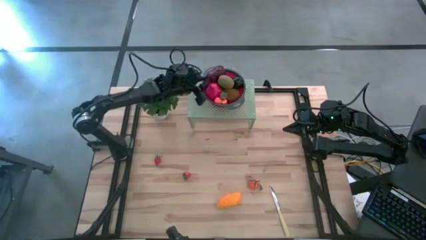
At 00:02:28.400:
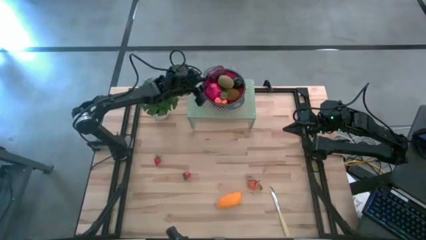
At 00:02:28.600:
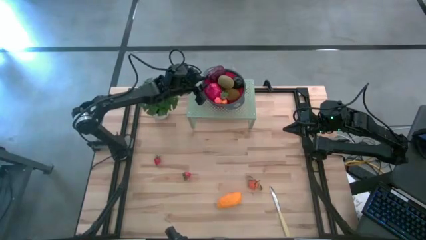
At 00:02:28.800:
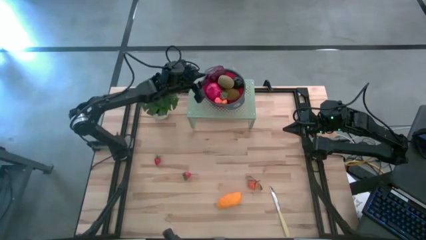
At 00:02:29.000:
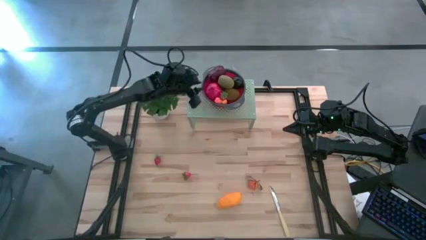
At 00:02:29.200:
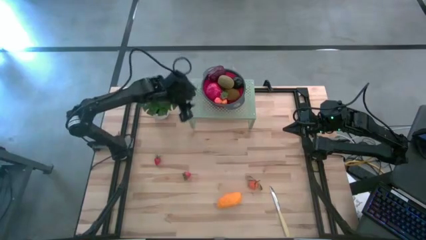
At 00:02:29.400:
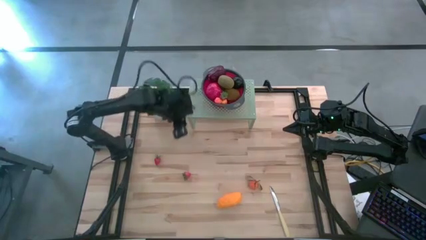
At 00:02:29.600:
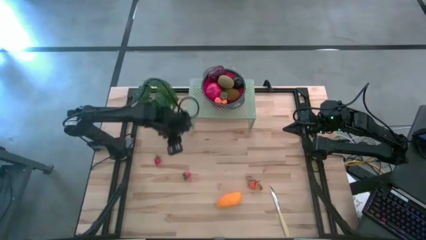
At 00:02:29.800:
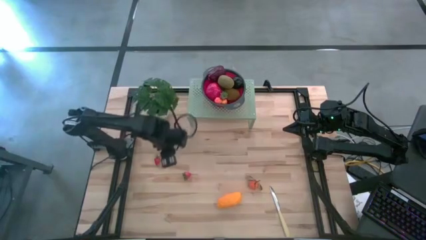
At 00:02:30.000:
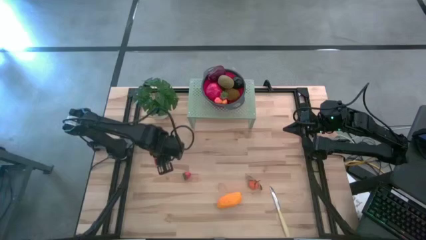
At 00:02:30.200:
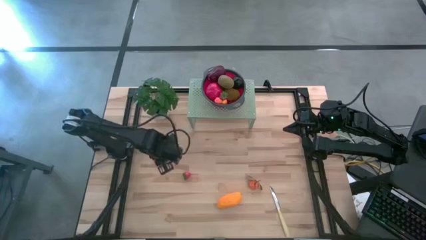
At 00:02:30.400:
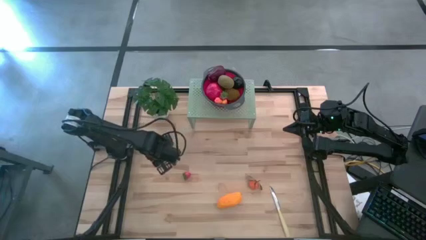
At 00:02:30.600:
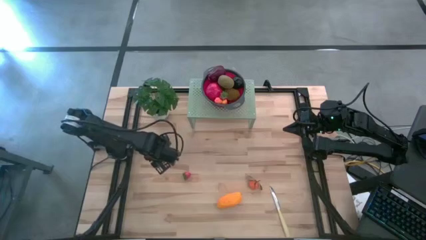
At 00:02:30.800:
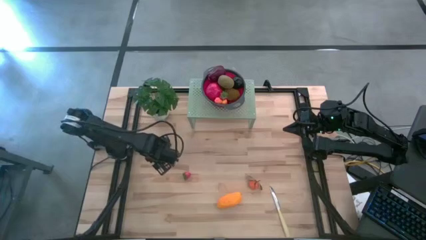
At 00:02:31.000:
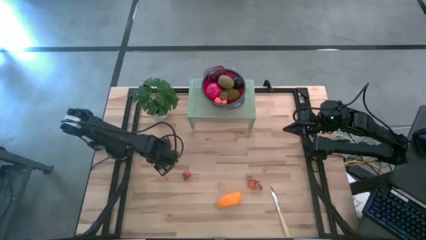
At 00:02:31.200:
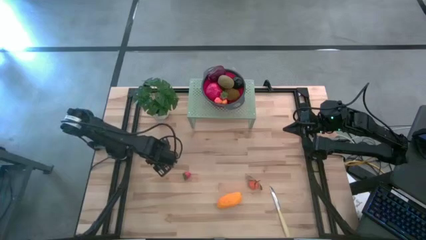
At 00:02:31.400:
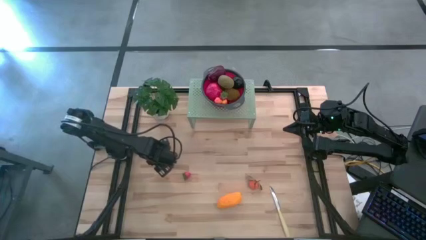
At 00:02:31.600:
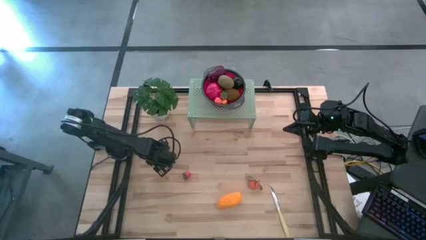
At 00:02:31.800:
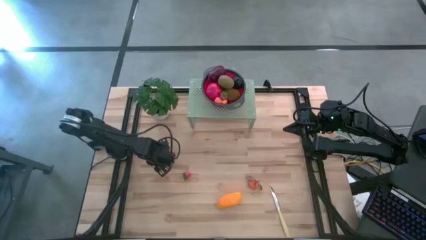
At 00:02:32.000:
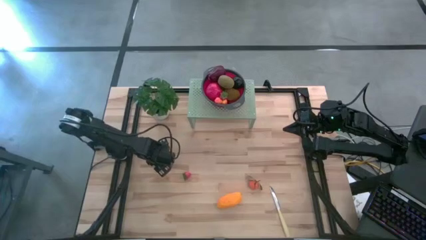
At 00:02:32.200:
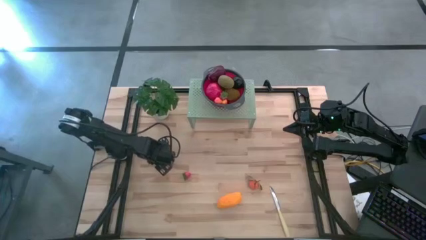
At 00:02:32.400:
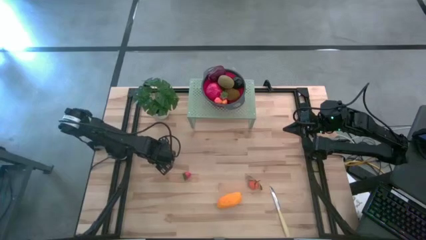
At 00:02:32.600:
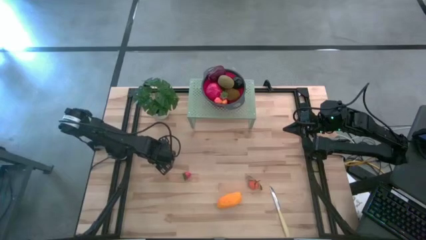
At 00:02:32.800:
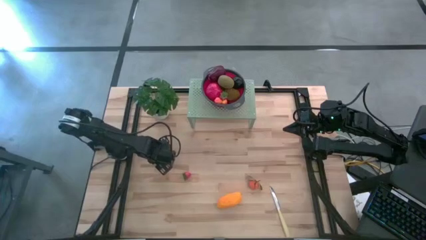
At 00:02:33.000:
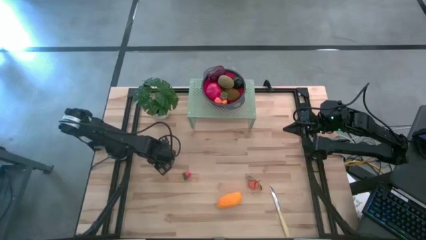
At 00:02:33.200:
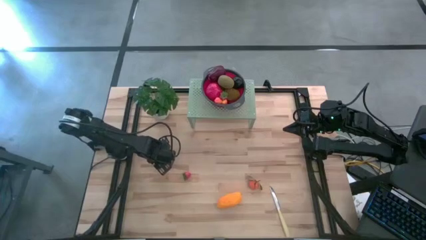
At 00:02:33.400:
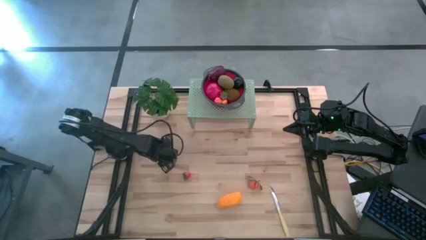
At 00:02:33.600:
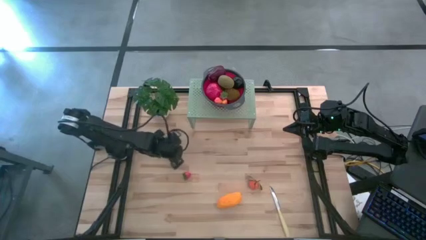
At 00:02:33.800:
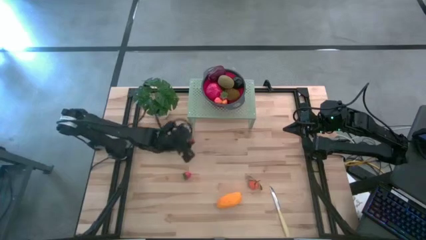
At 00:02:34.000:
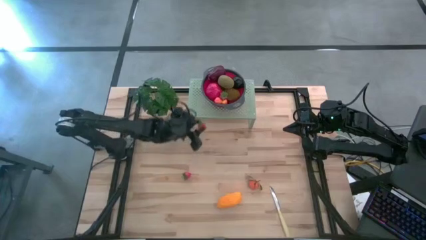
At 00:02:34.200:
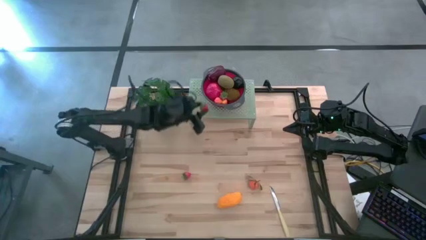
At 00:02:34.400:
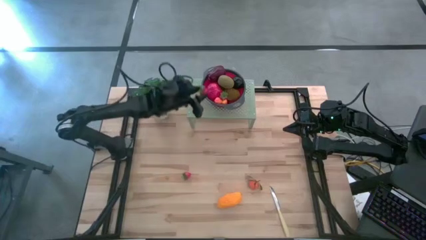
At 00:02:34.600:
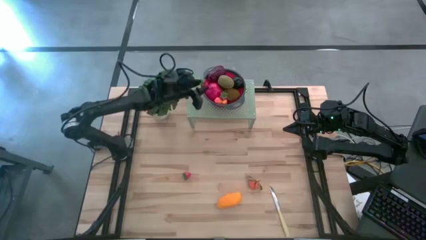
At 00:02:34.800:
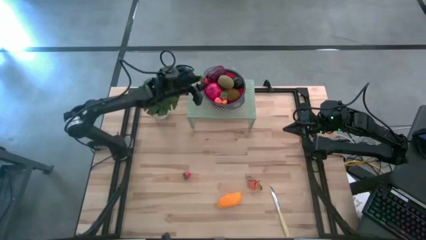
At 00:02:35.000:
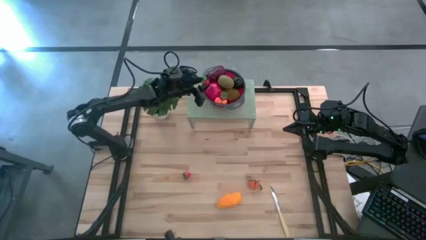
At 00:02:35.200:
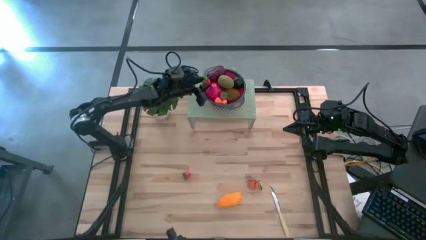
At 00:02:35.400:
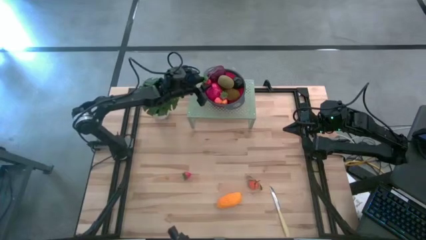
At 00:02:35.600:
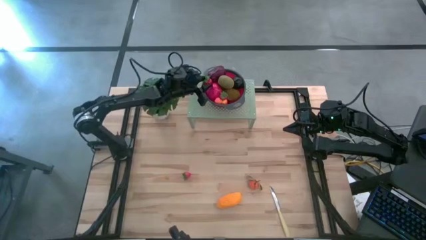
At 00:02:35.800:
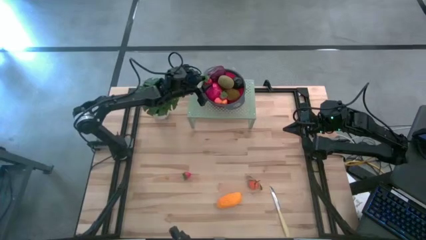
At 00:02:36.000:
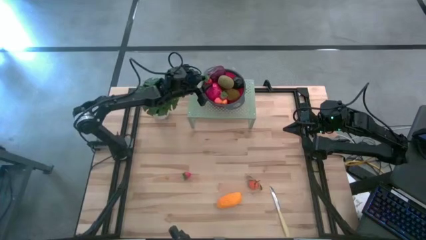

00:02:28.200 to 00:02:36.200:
Task: Pick & Place Fruit
Put the strawberry into the red strainer bowl on the shelf

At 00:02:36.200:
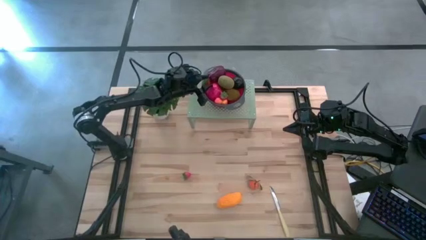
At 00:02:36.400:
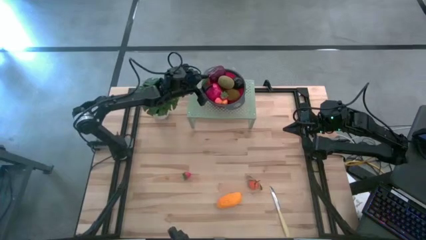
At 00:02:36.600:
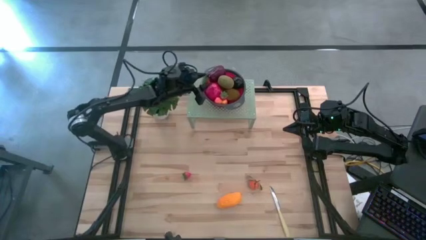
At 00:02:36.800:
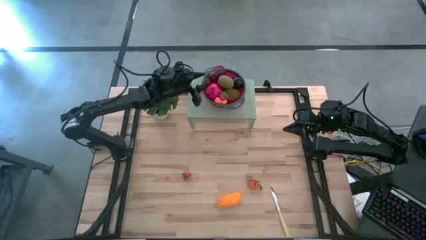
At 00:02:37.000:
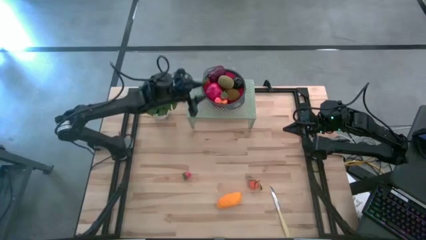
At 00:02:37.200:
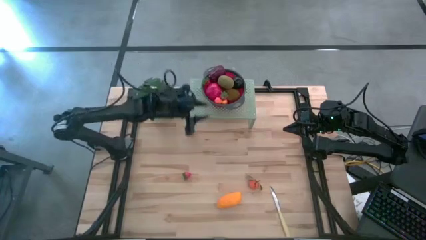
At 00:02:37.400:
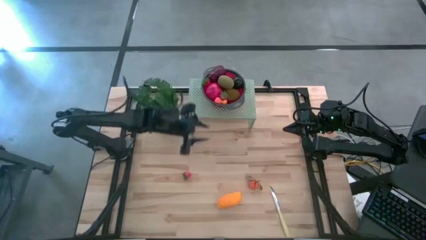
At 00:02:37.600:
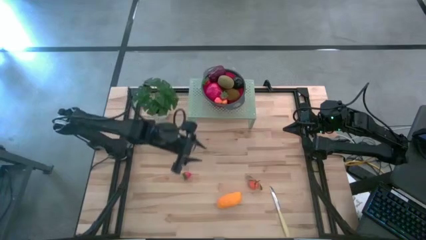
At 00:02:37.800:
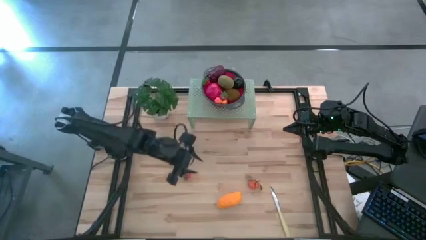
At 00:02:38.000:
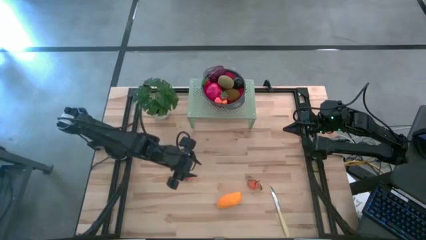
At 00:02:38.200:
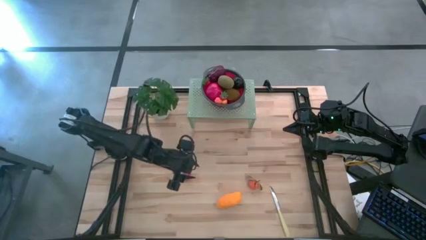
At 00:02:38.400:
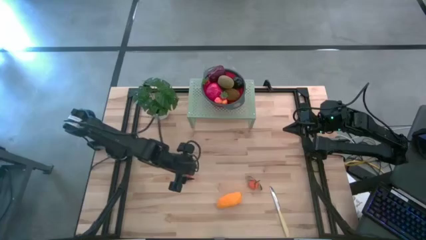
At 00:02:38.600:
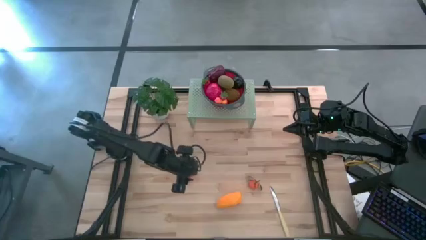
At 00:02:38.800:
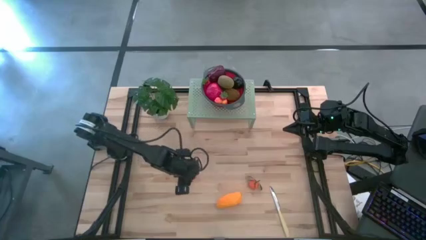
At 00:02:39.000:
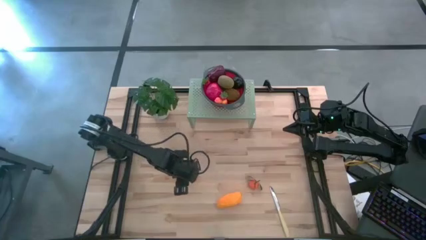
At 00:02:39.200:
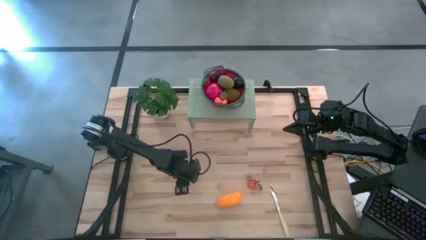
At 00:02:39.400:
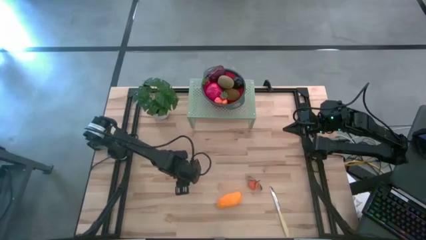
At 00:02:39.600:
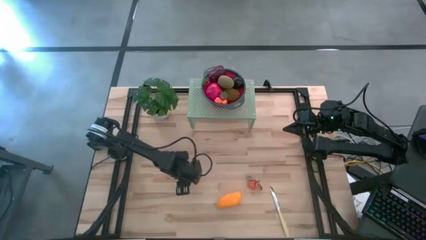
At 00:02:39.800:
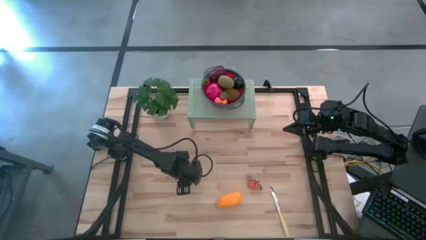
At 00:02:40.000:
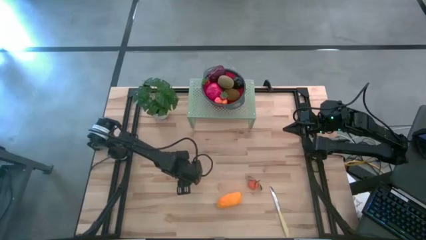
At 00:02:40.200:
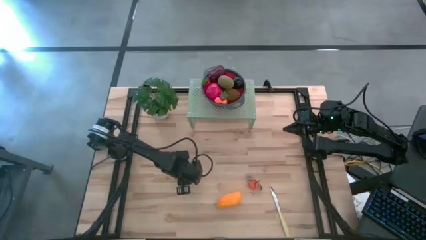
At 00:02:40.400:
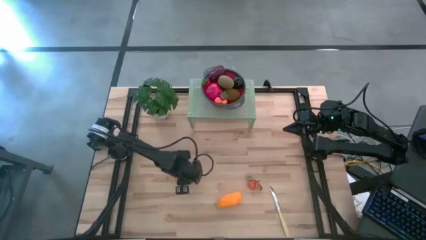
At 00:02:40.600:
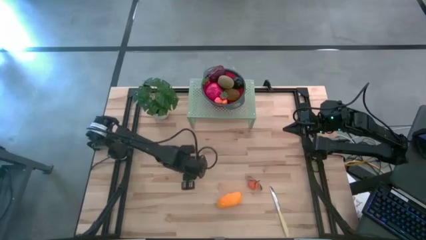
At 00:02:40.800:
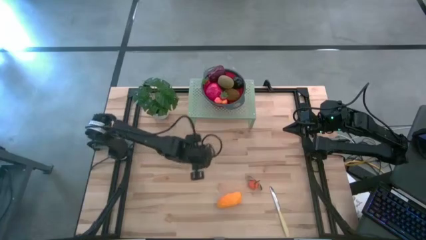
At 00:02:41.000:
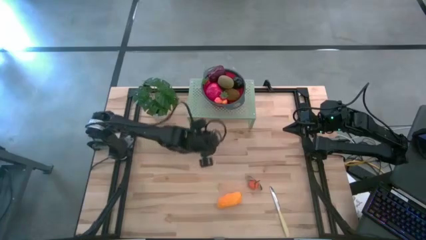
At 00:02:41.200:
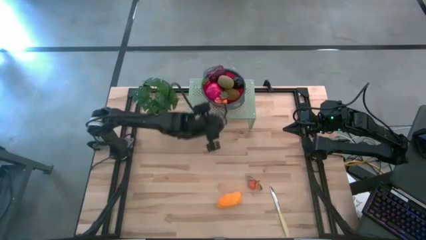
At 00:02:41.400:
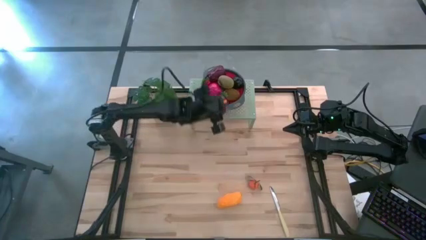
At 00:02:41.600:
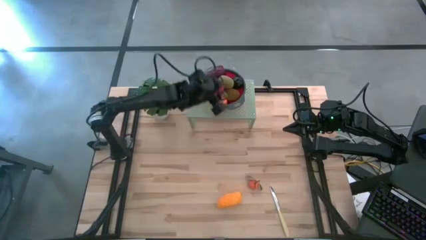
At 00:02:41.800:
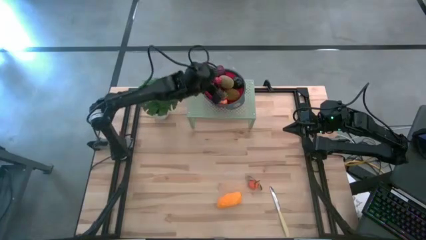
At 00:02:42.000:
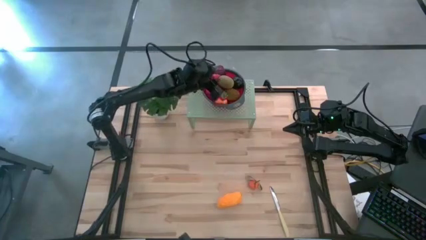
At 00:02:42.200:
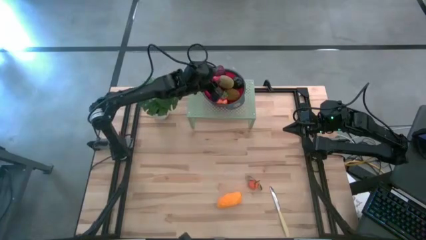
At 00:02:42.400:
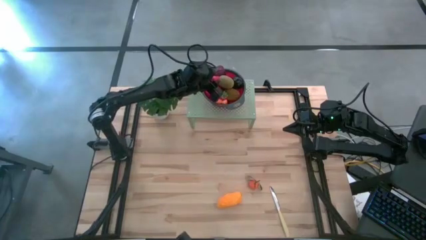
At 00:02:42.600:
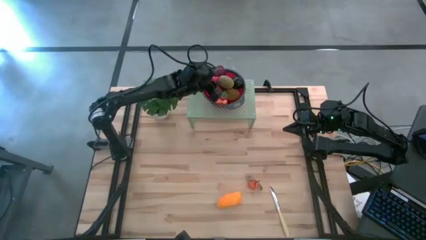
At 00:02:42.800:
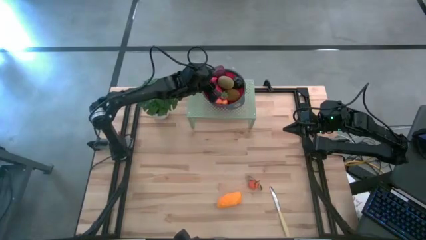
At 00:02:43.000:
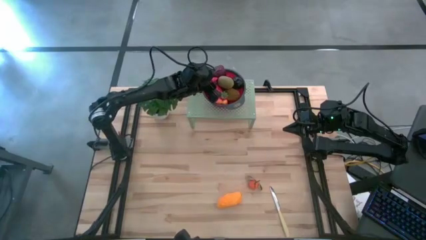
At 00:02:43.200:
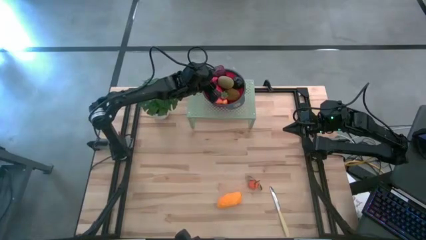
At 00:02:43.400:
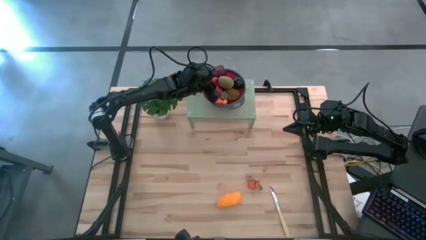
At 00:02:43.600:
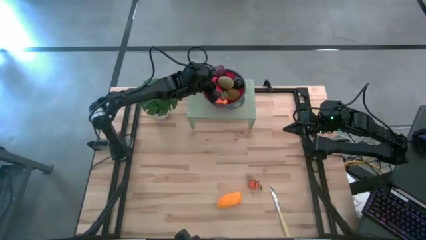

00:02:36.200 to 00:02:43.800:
Put the strawberry into the red strainer bowl on the shelf

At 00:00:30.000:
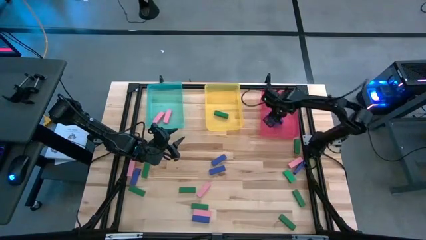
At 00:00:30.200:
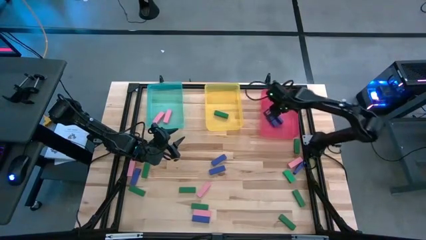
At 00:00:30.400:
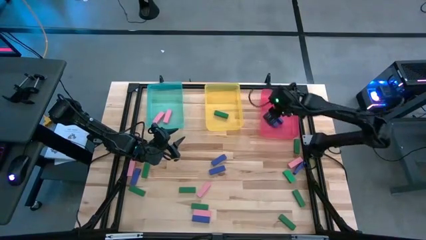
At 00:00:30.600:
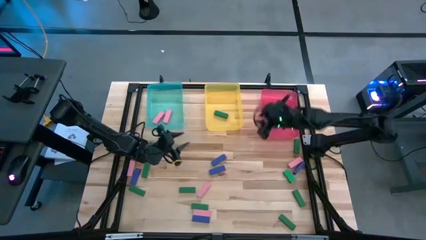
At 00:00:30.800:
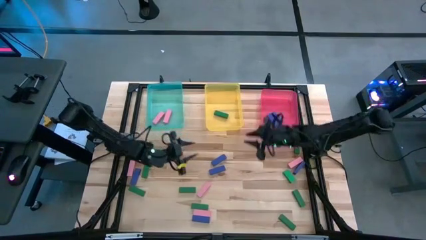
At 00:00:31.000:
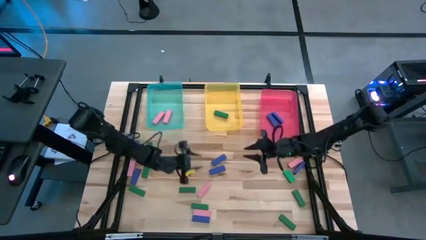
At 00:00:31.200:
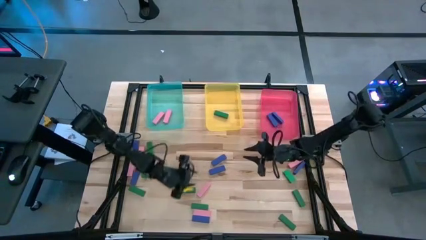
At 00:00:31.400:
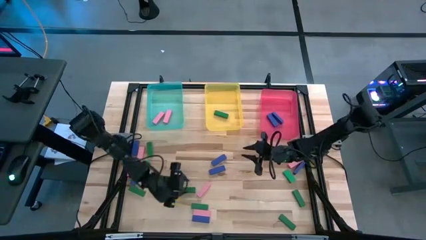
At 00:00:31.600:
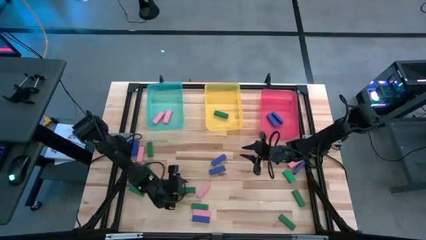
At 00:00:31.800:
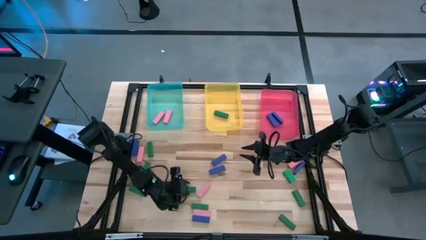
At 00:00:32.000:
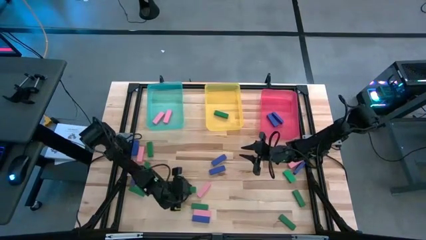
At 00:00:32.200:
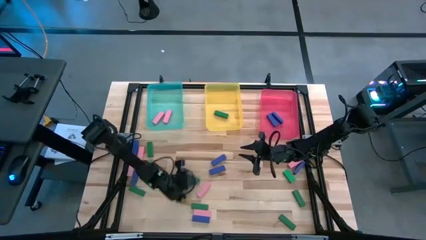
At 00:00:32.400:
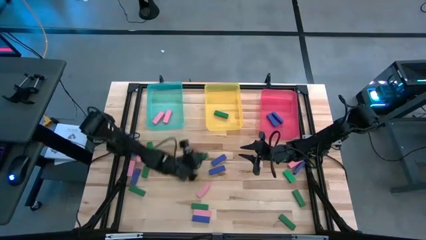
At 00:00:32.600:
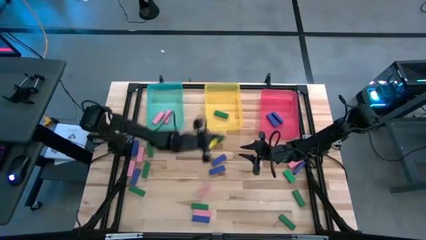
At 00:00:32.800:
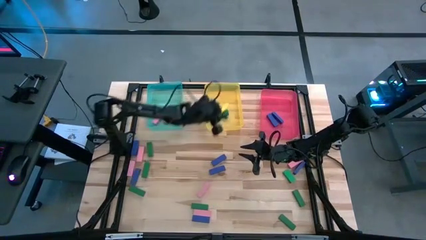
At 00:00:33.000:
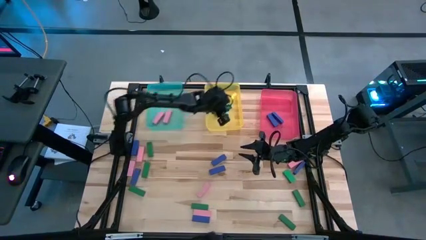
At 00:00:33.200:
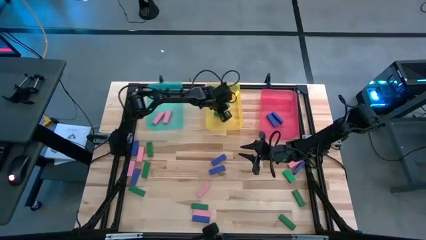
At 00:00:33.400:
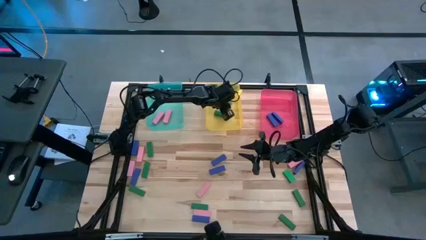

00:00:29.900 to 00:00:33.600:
Task: Sort blocks
Put the green wooden block into the yellow bin
